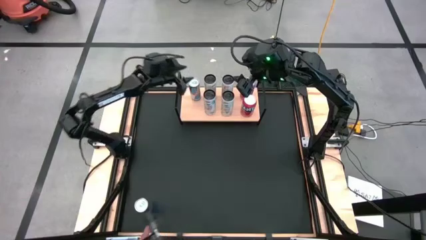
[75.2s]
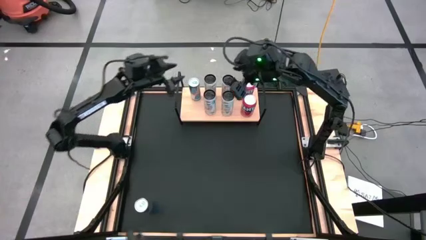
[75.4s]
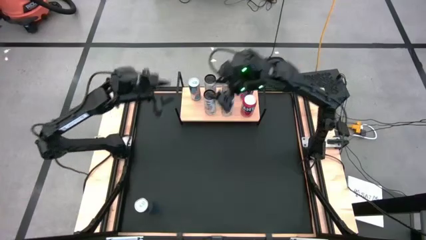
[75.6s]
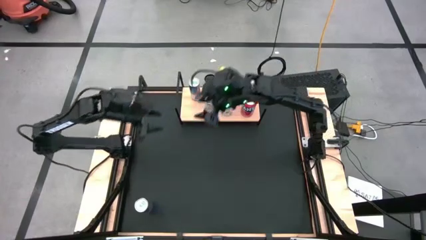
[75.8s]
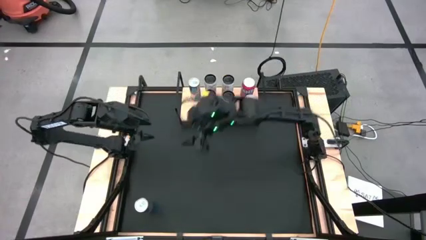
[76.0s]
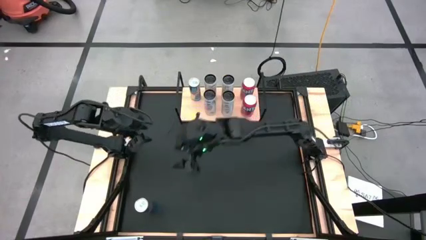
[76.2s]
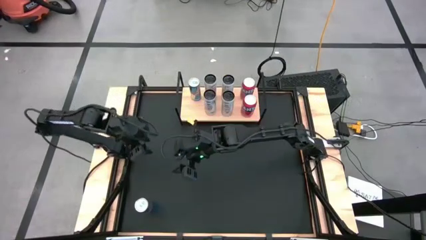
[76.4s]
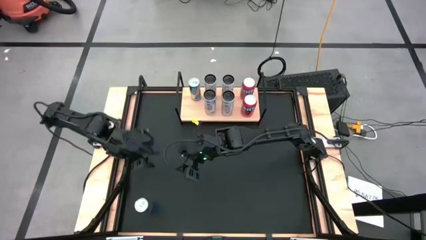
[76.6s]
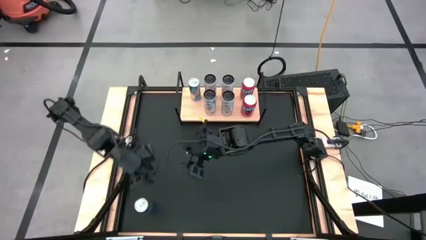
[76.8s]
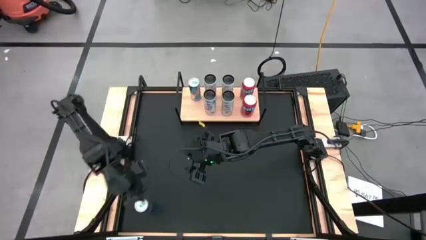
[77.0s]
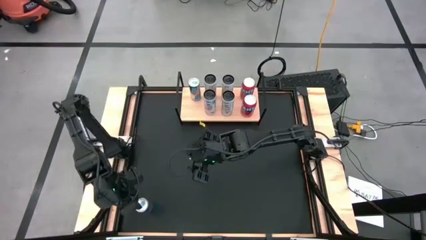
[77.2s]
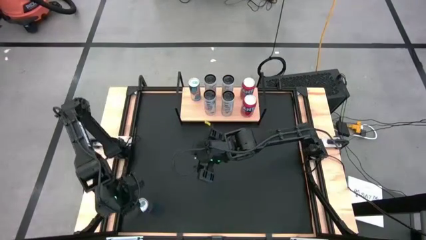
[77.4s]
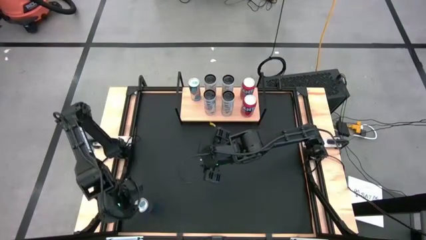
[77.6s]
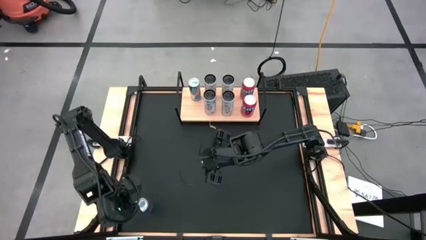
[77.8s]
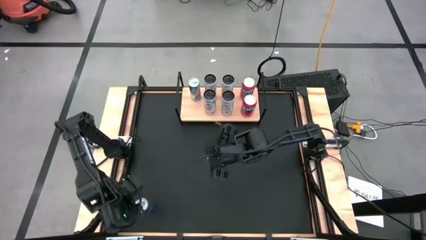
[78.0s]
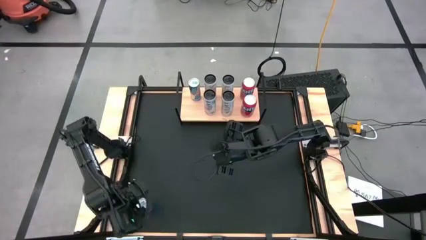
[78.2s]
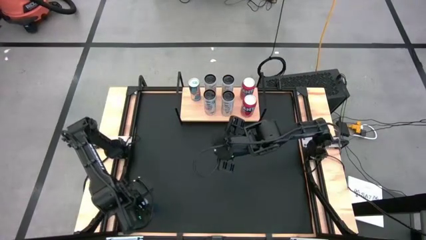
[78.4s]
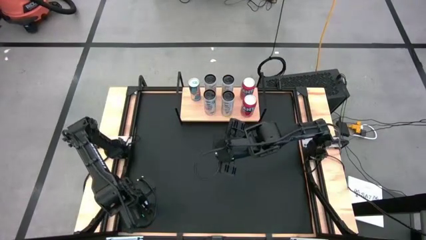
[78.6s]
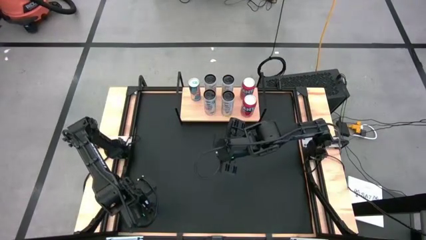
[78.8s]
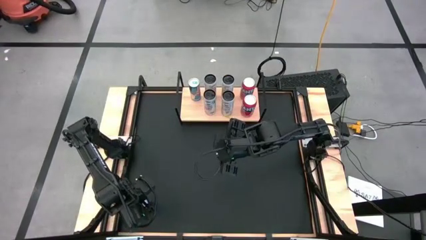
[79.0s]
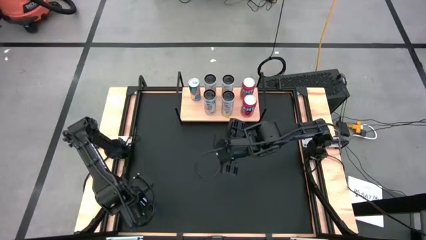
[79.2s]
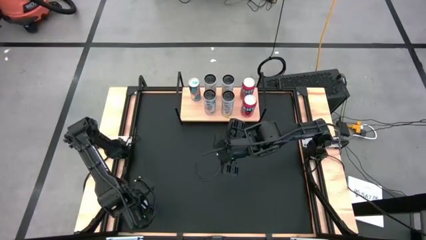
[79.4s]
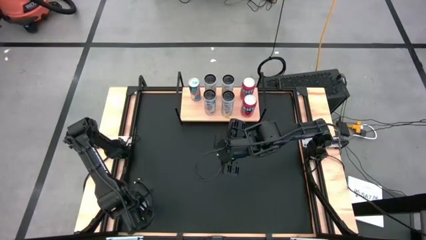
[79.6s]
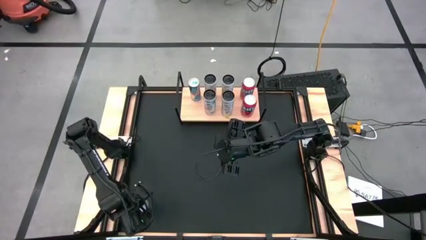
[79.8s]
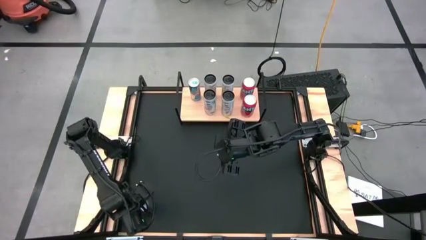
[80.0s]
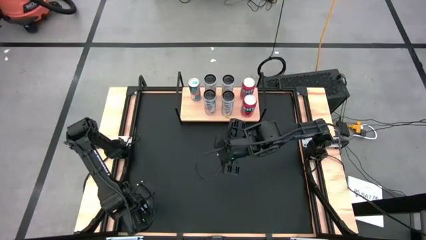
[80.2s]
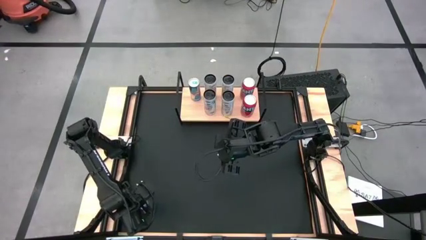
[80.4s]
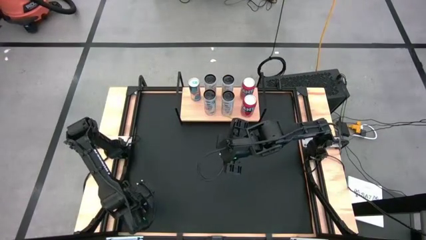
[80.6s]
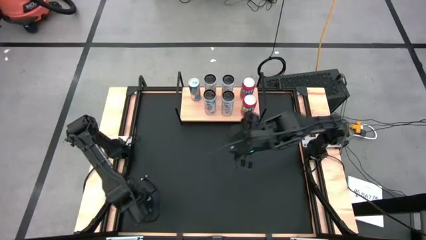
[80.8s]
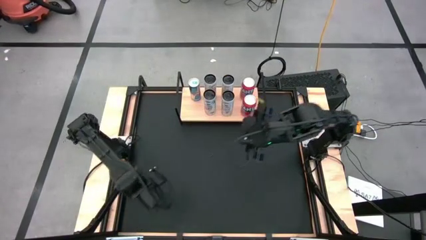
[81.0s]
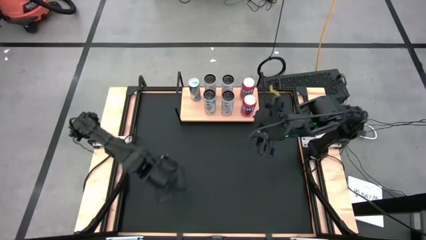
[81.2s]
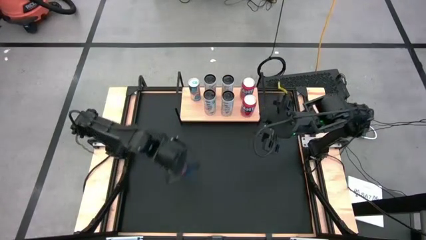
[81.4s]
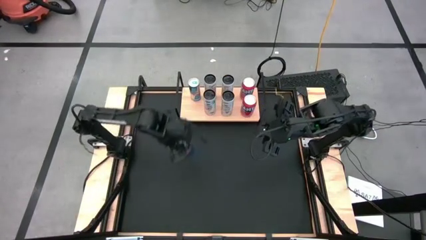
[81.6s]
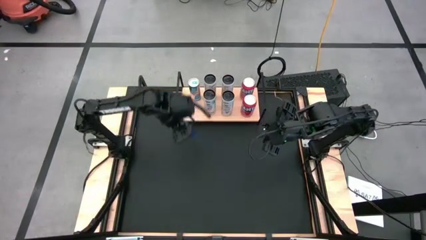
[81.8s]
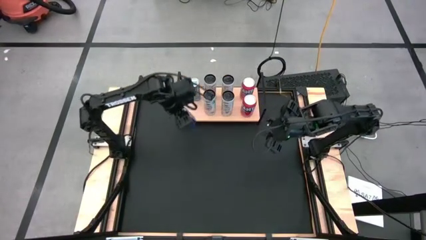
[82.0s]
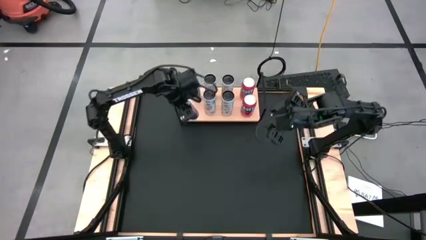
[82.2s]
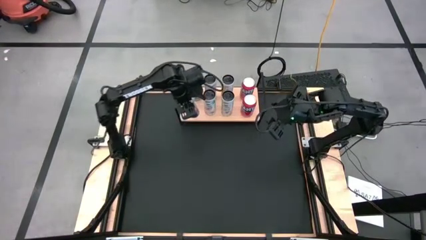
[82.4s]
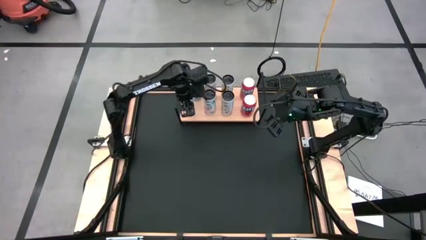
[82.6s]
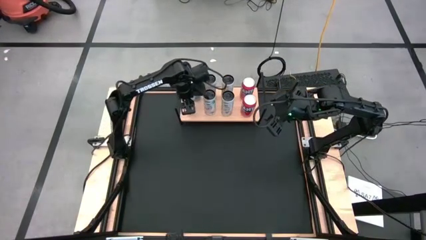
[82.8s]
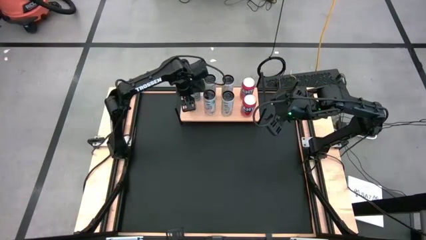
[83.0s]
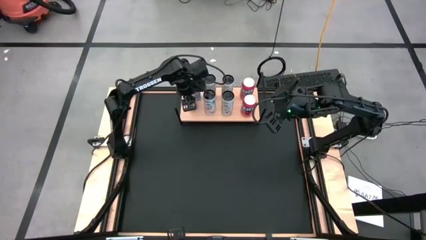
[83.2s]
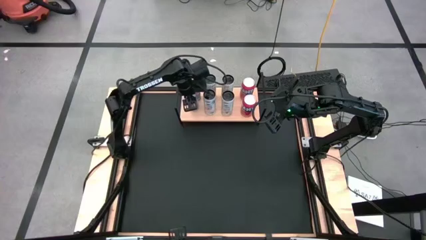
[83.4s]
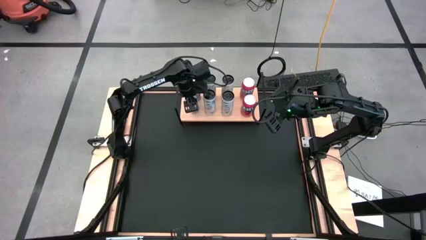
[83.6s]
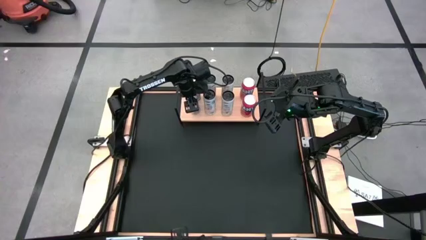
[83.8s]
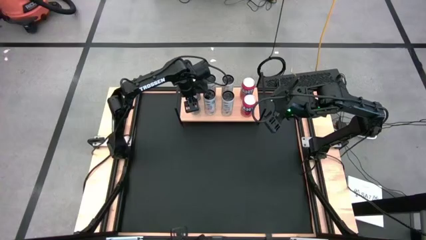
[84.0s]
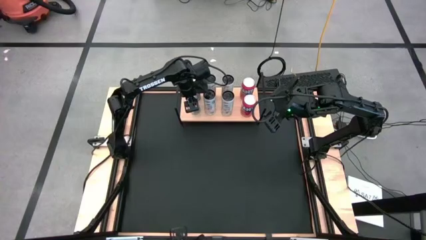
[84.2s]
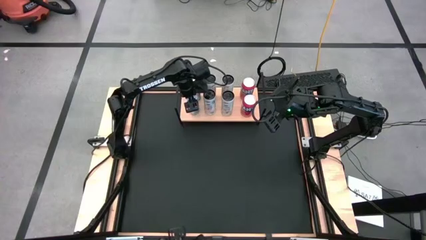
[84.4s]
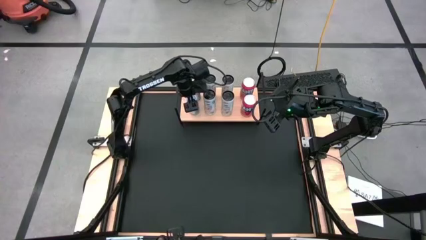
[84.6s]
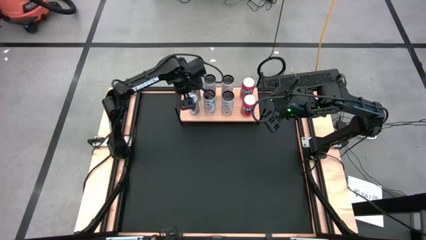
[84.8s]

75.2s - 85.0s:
Task: Place canned beverage on shelf
Put the blue soda can on the shelf aligned with the other blue soda can

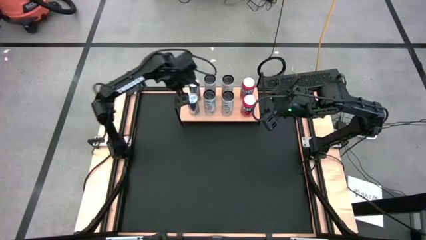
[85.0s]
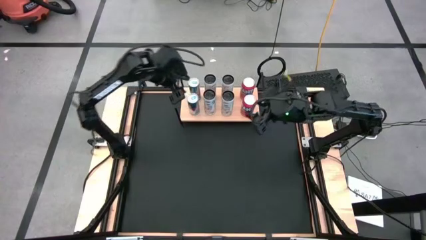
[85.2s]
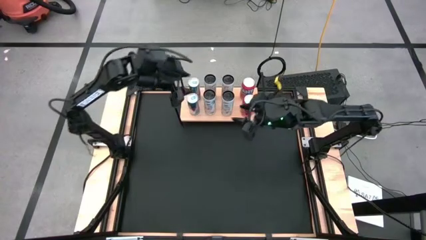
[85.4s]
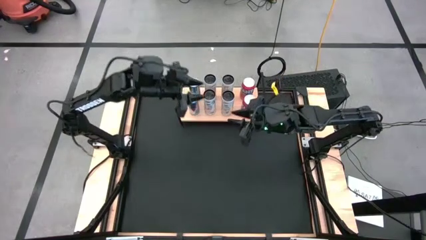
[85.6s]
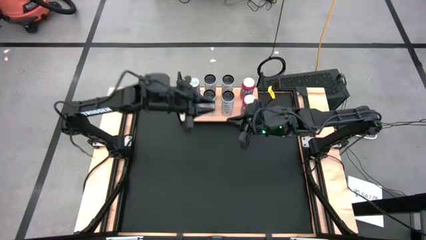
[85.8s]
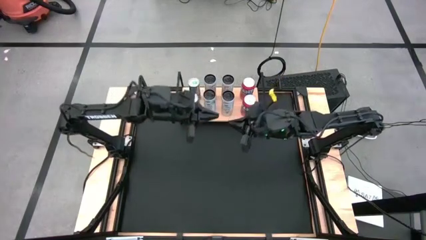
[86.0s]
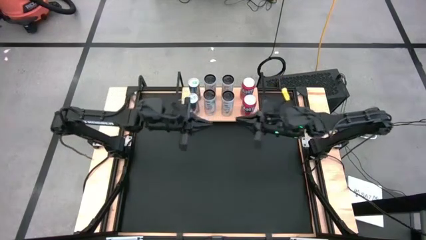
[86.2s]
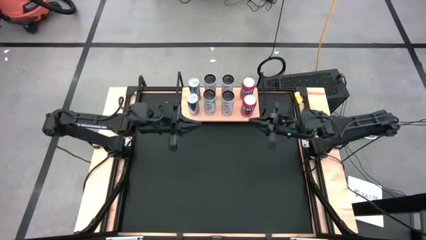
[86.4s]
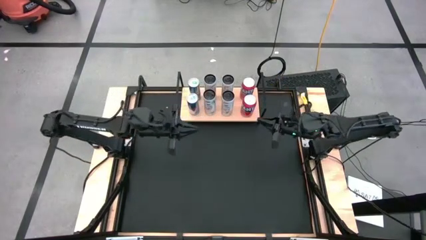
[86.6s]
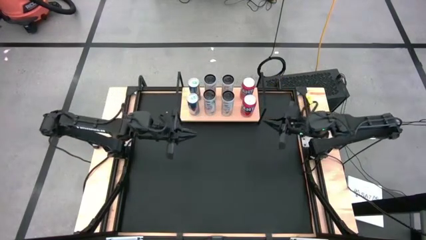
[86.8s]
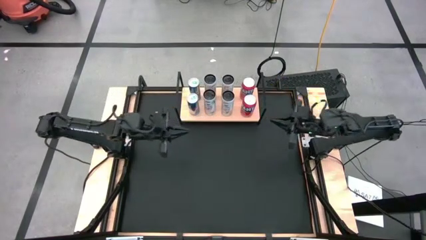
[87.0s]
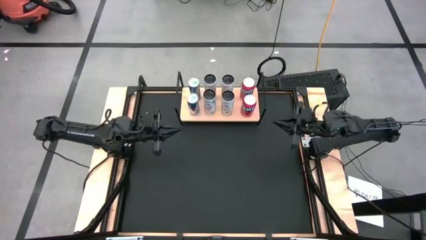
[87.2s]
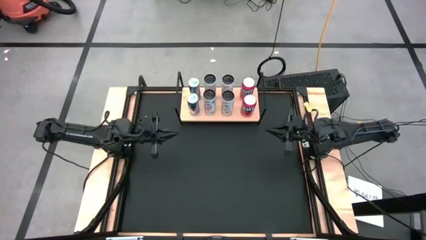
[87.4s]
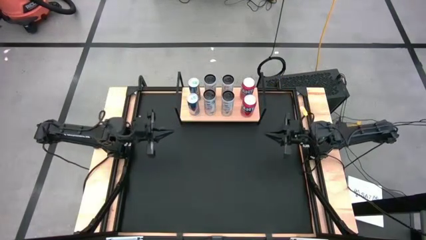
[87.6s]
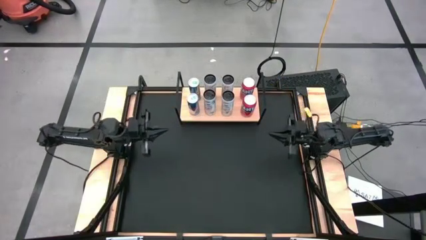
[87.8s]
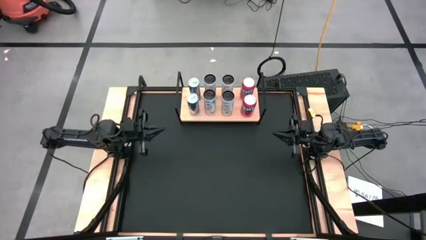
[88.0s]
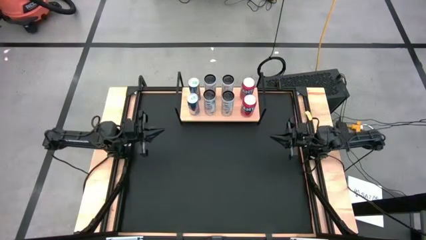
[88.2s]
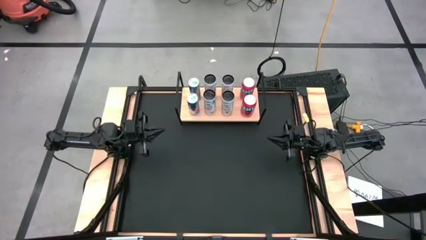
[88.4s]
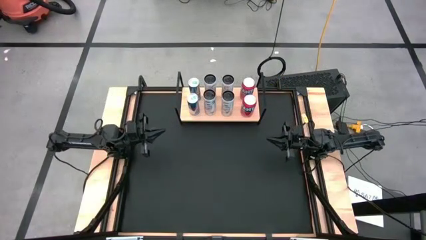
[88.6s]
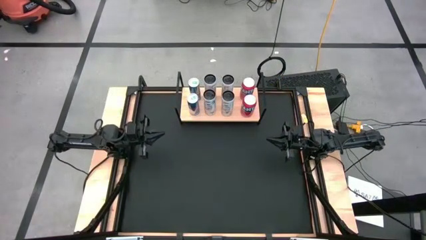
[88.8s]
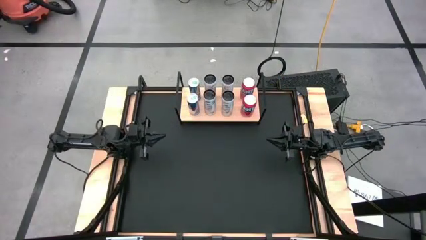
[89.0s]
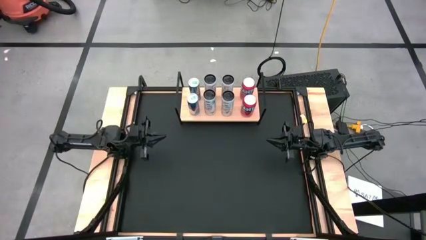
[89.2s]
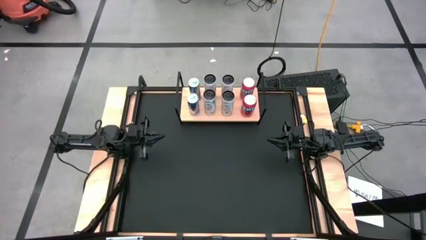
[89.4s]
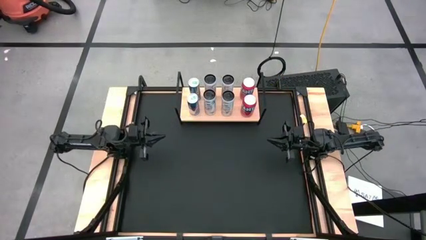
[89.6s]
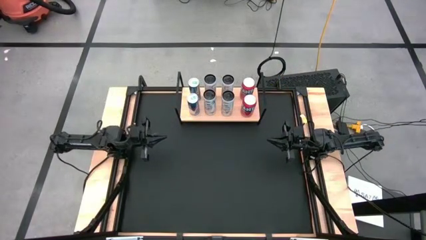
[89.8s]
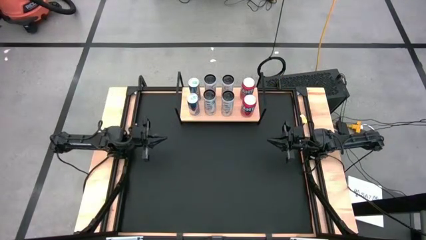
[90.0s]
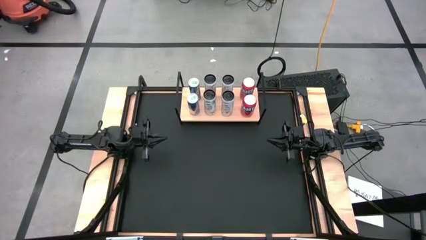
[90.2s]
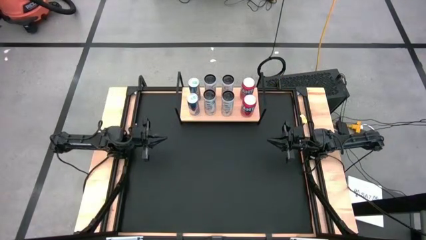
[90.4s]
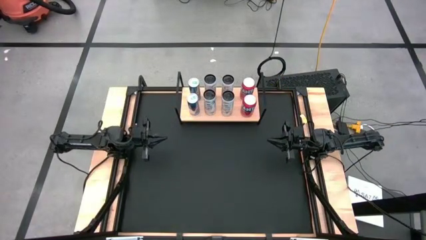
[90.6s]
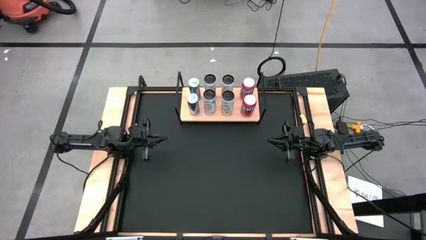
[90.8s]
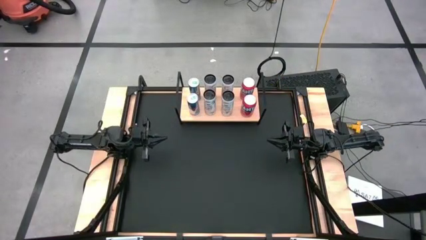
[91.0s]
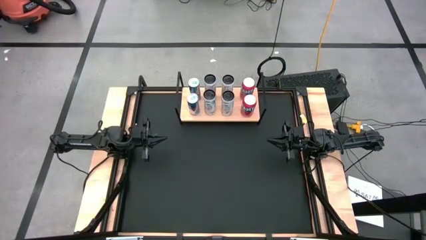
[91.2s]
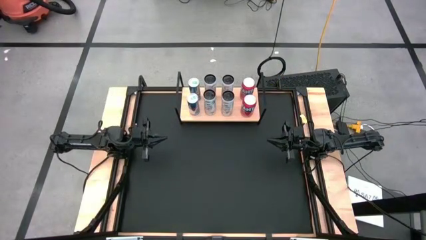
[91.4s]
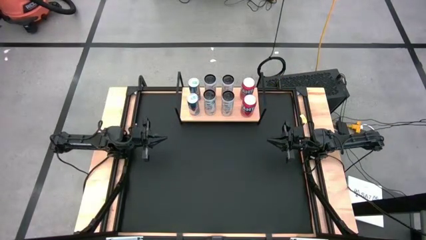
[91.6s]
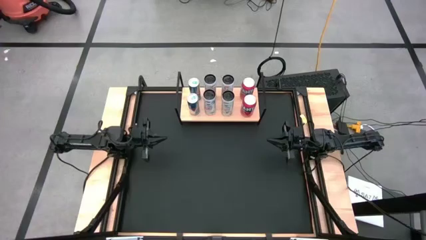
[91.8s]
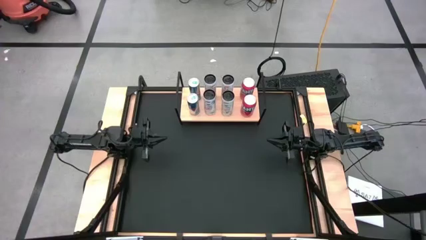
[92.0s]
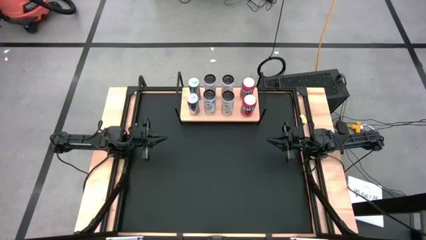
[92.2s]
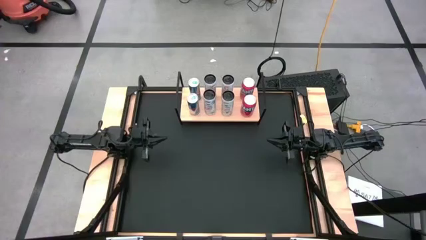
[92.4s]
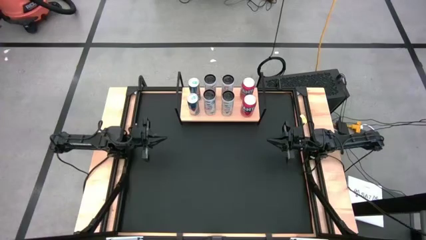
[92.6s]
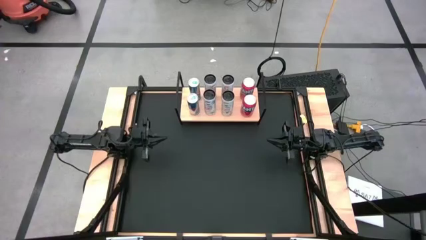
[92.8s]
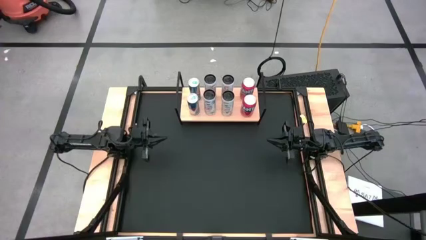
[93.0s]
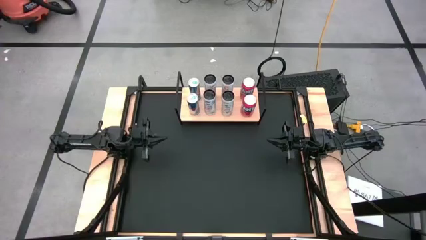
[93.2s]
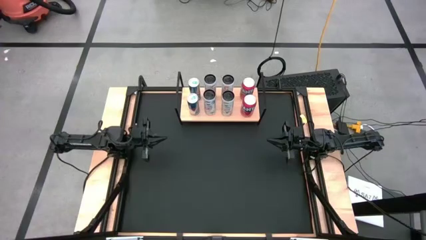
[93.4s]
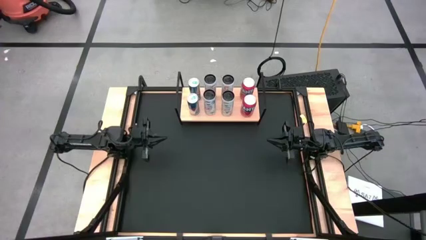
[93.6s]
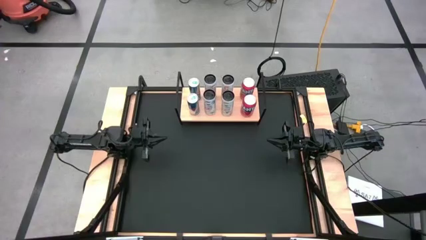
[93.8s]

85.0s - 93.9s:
Return to Home Position
